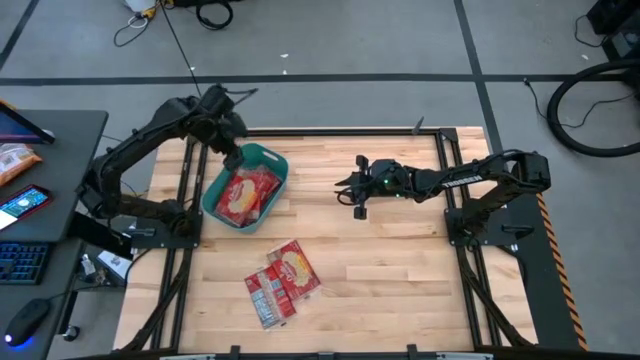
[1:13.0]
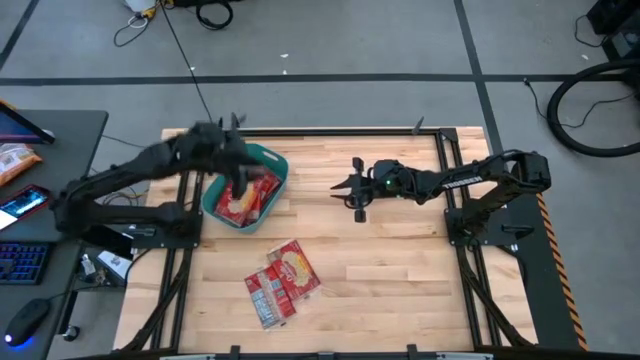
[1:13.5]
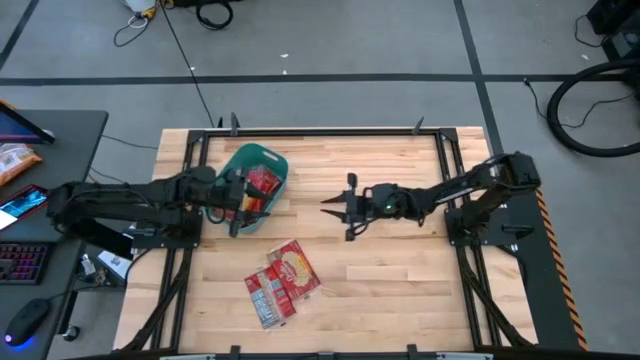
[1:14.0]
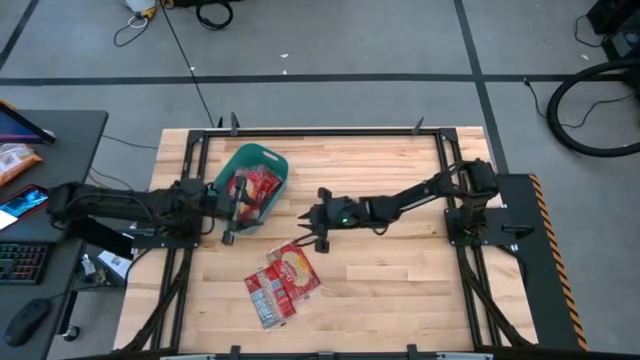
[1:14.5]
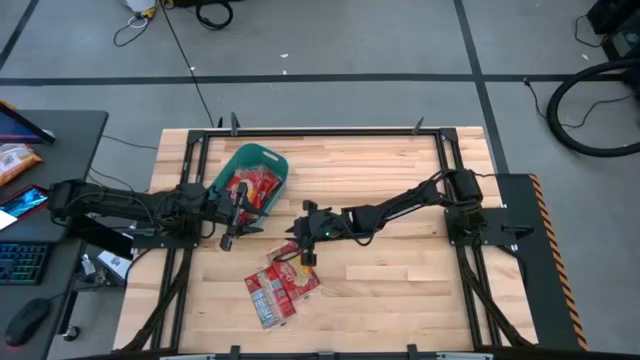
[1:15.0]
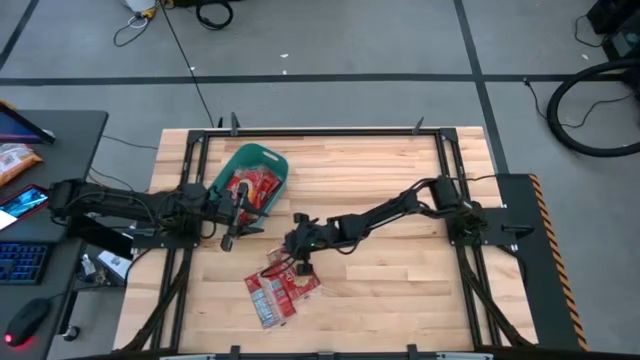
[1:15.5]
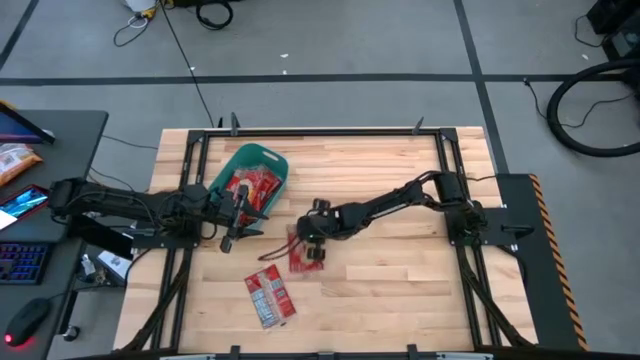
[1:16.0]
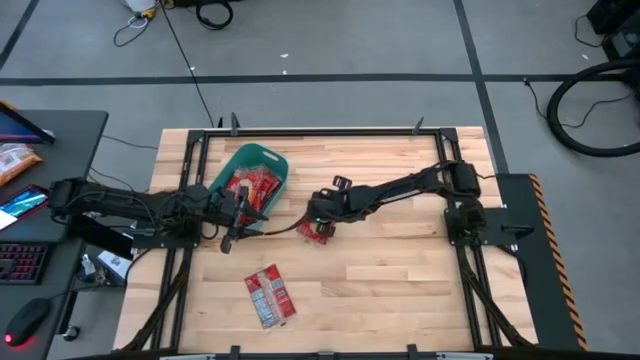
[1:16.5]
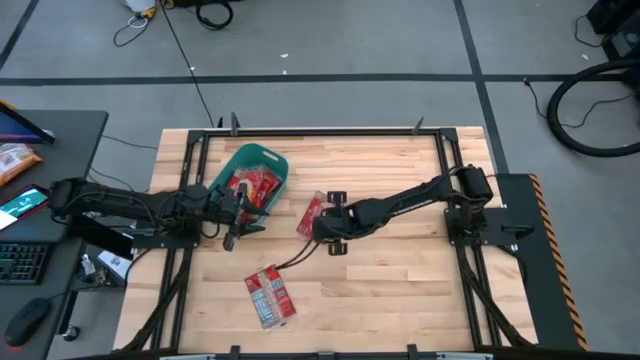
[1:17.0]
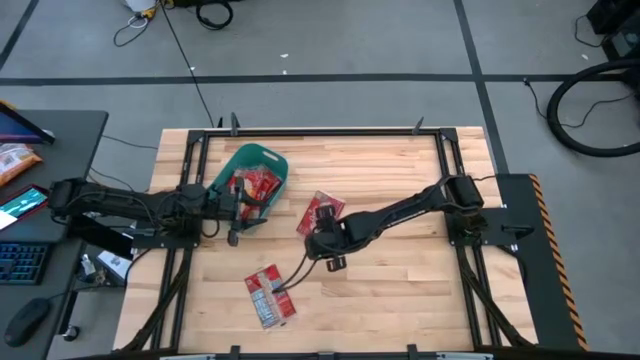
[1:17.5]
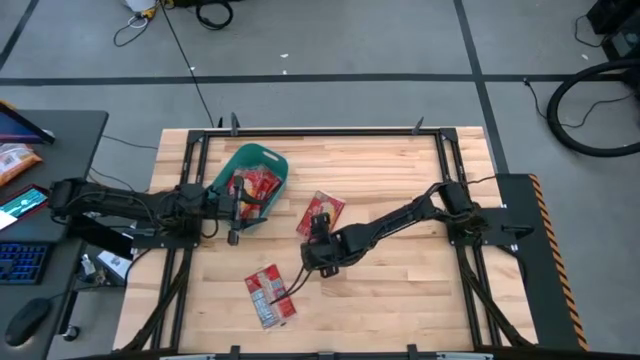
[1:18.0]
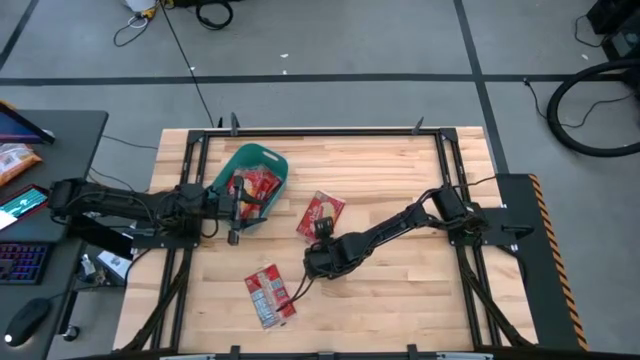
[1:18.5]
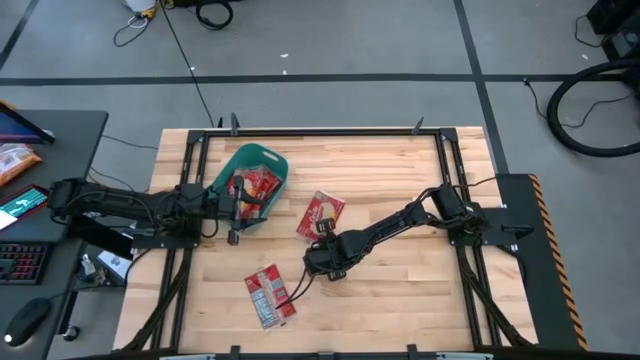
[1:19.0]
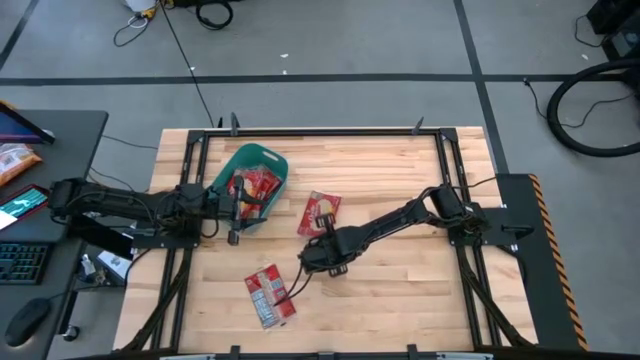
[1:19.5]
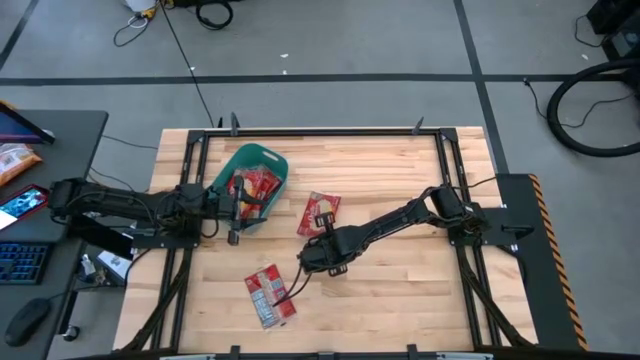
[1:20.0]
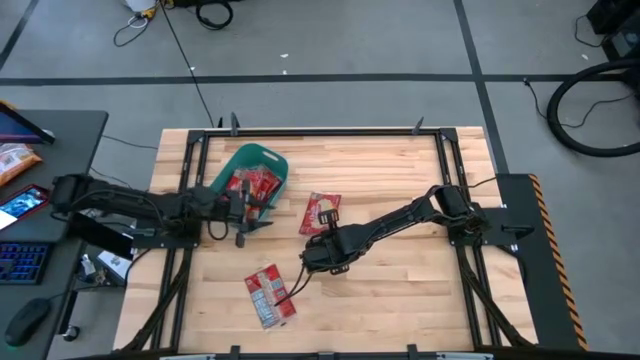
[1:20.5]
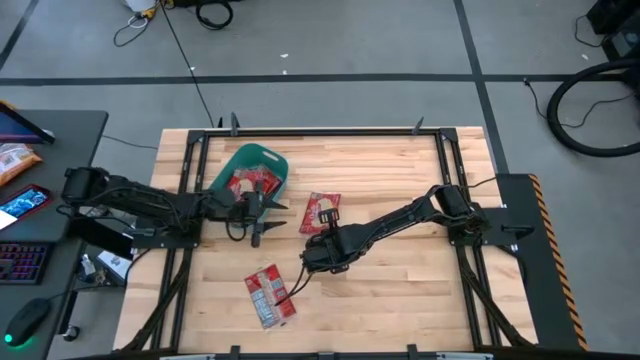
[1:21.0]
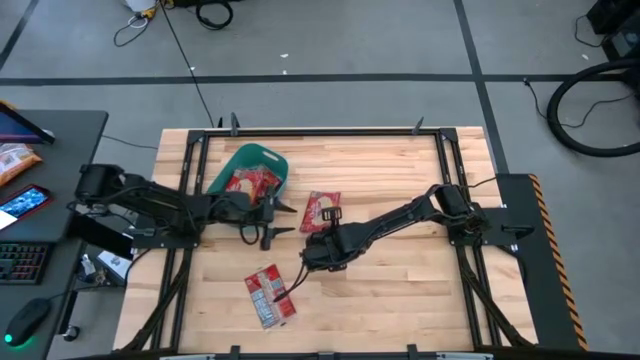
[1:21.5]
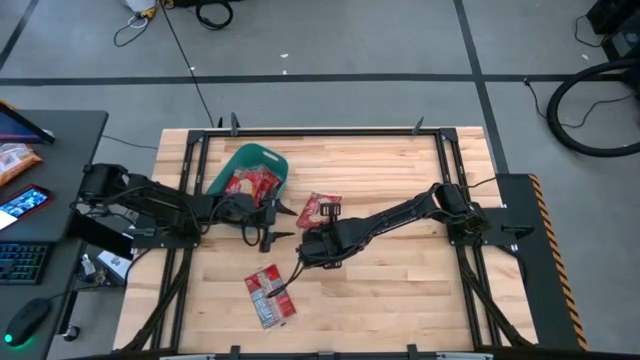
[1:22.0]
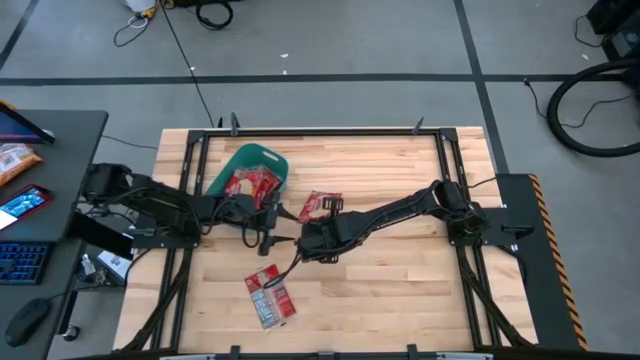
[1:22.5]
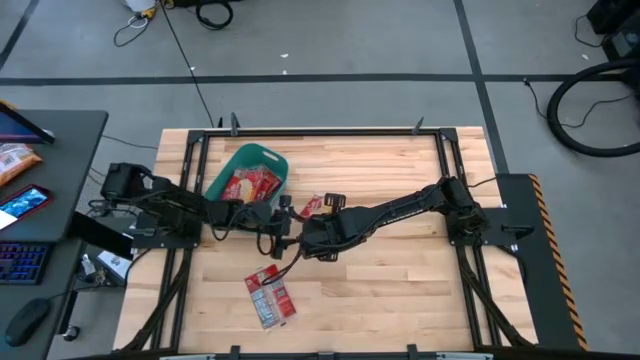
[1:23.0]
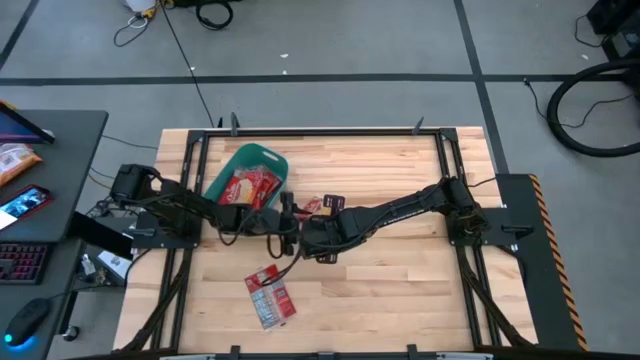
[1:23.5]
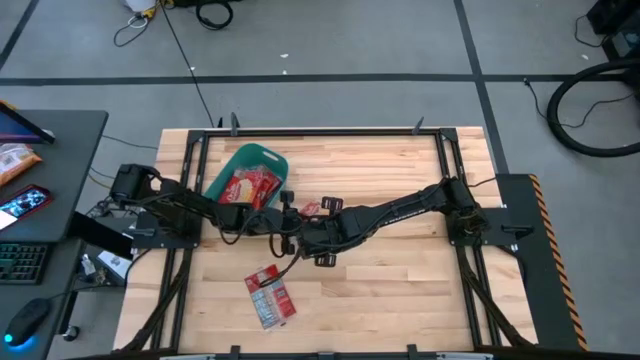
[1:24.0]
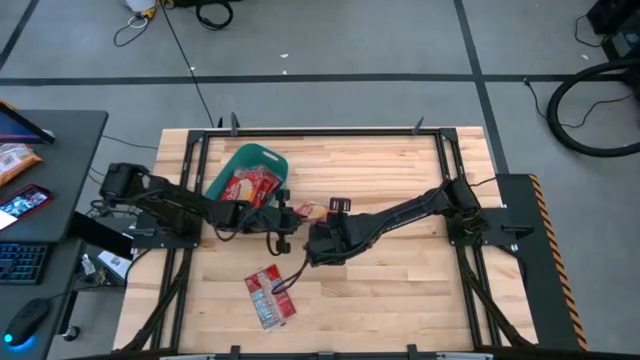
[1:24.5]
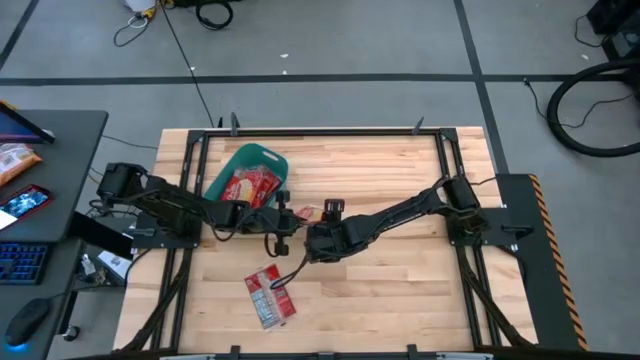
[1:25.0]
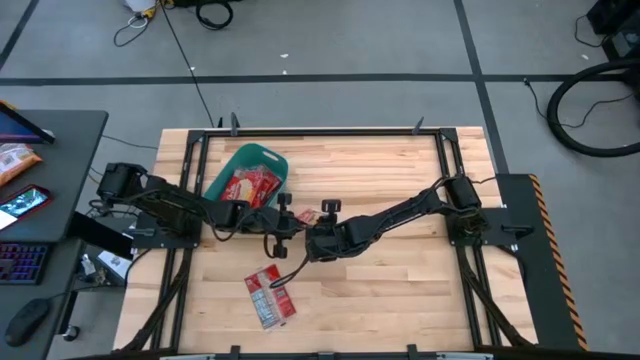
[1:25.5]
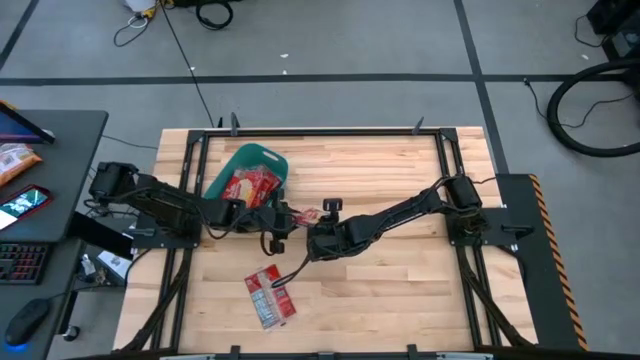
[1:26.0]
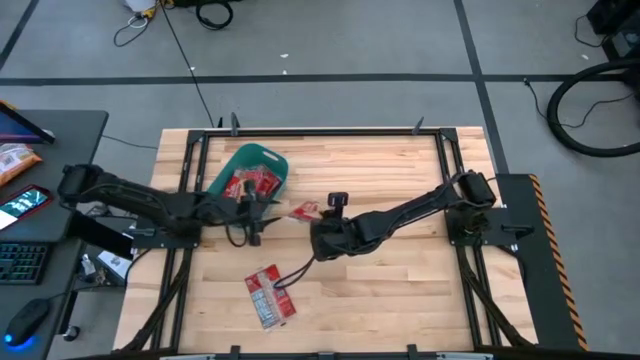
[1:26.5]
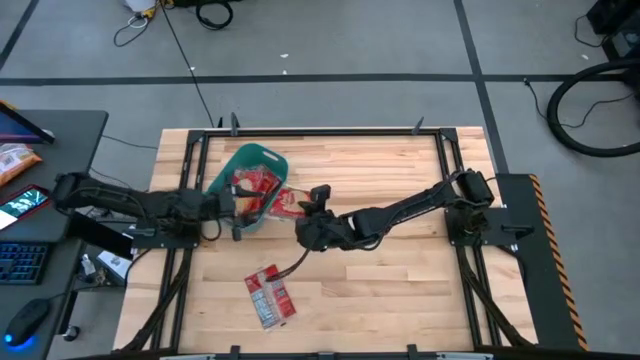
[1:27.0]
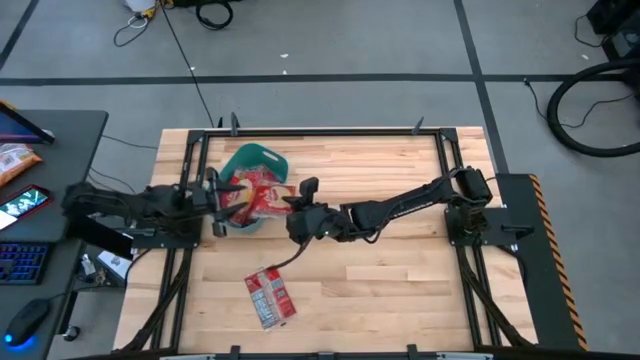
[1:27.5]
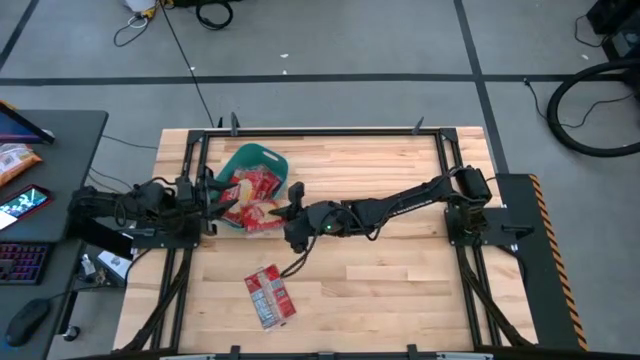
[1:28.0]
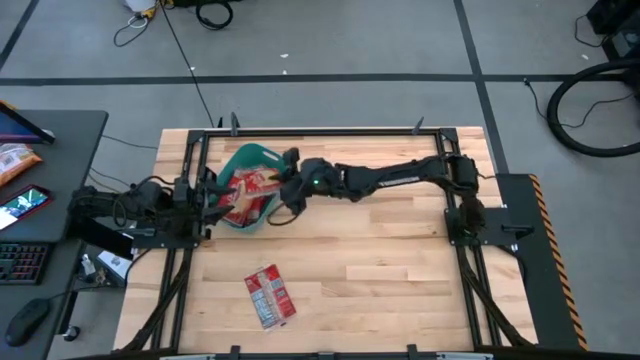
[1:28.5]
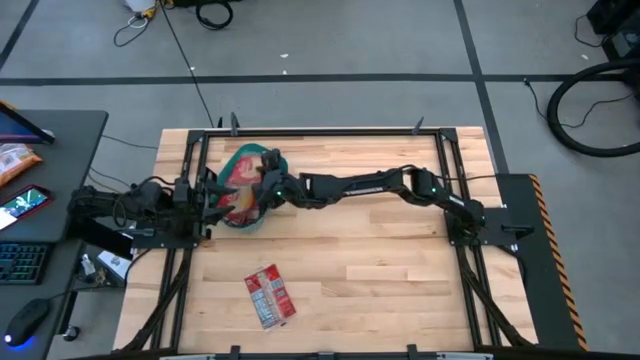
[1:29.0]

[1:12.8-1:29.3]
Task: Sort popcorn bags into baskets
Put the red popcorn bag into the green bin

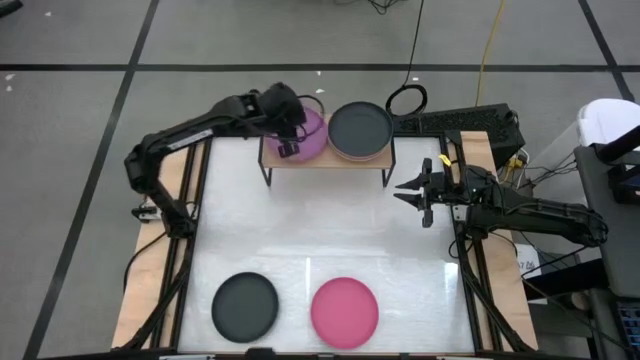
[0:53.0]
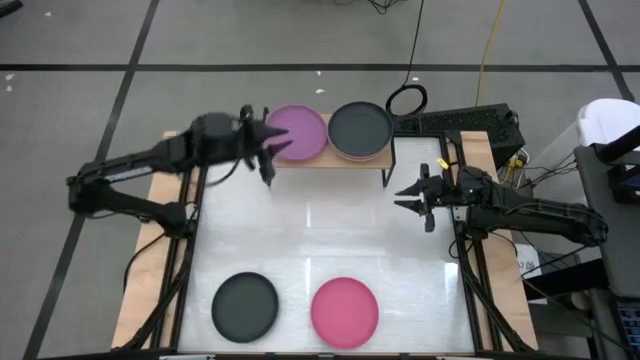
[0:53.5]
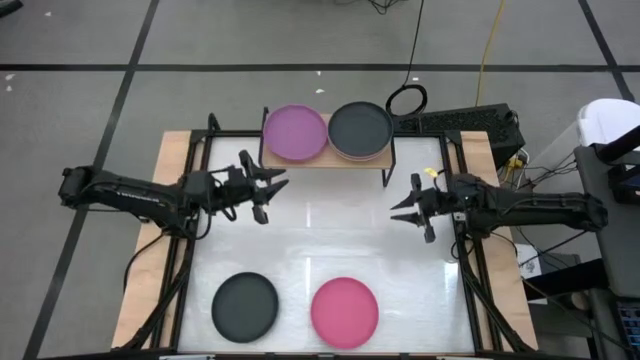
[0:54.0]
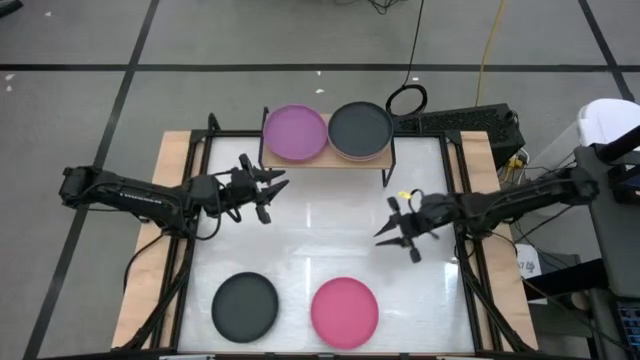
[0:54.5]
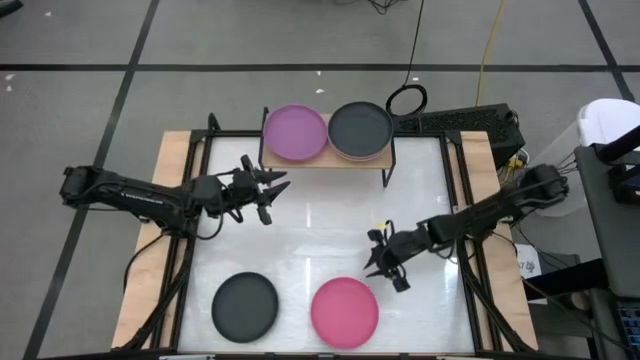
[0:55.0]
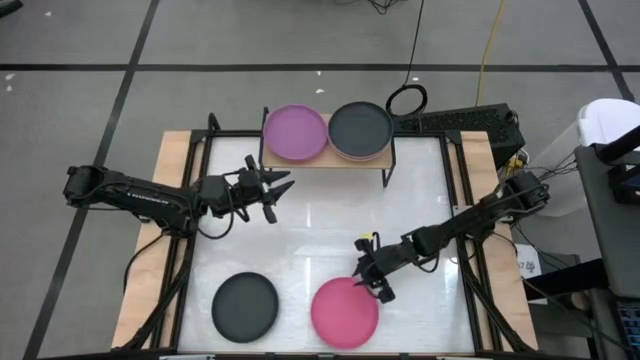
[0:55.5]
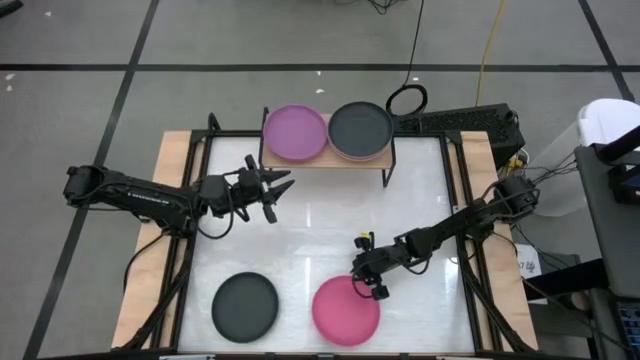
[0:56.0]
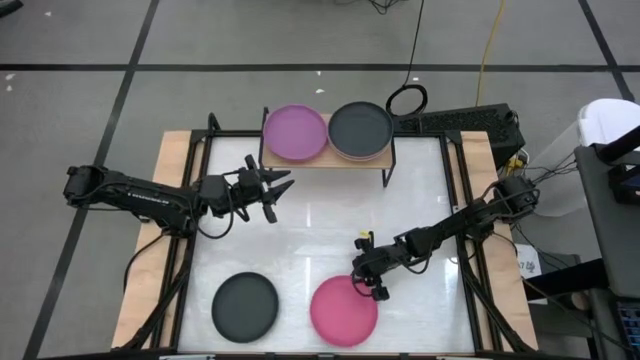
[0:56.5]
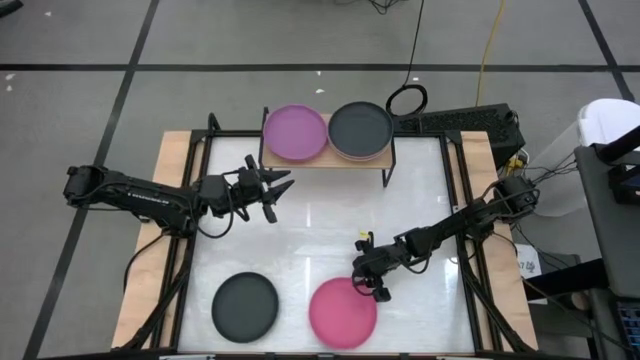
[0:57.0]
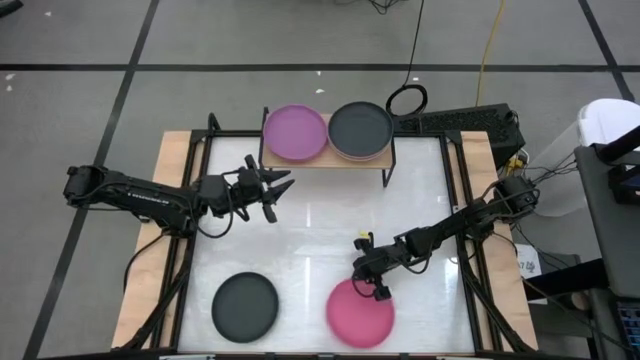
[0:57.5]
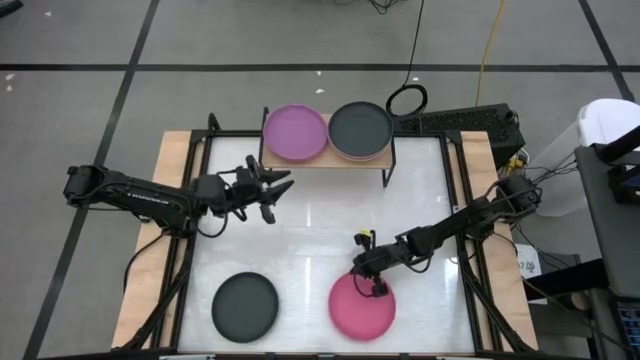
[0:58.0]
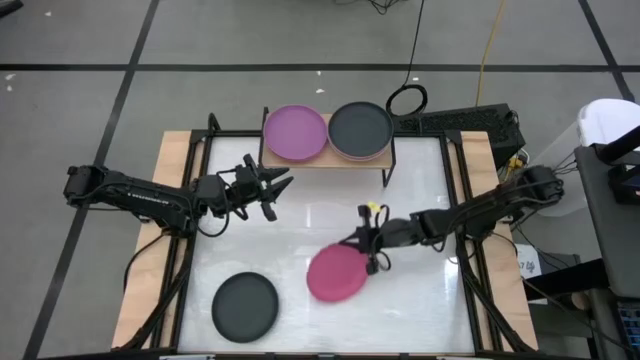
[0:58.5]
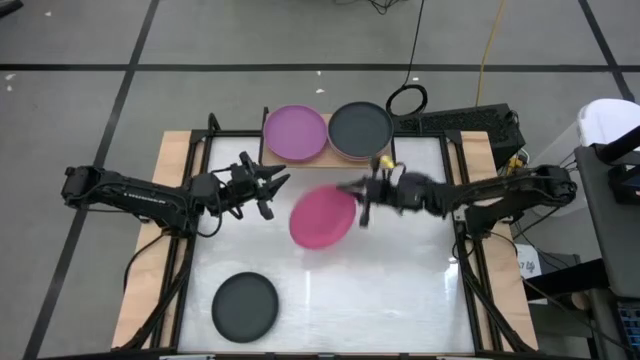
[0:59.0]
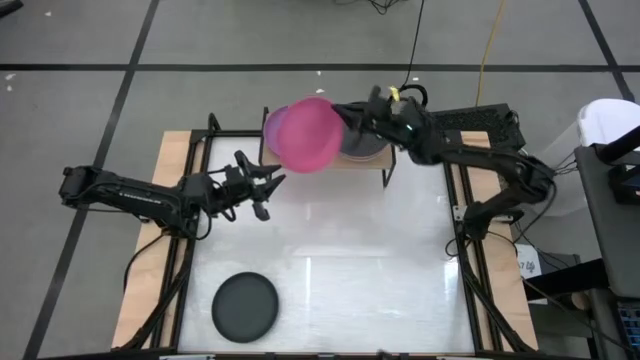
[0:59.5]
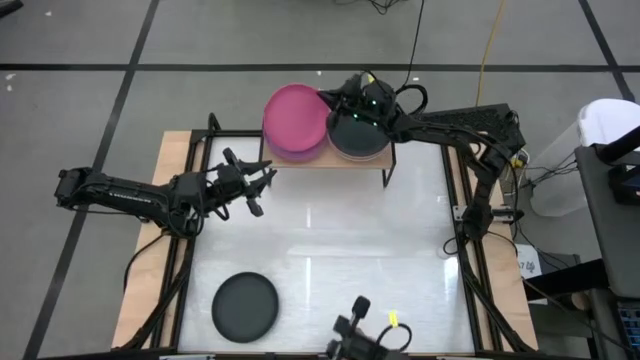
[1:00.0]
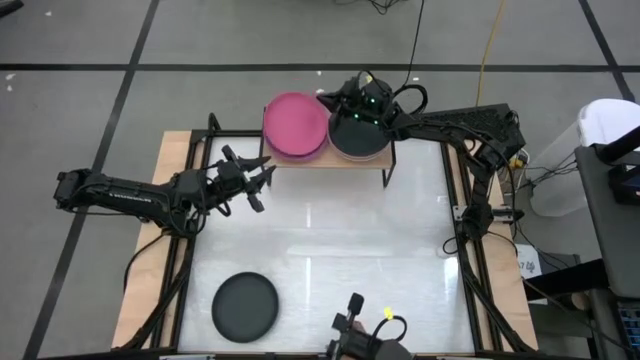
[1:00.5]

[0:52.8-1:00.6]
Task: Place and stack plates onto a shelf
Stack the pink plate on top of the purple plate on the shelf
